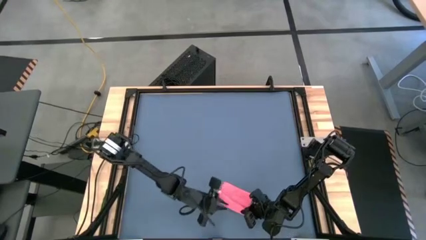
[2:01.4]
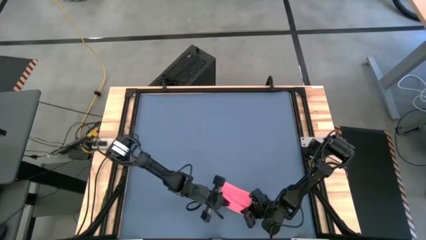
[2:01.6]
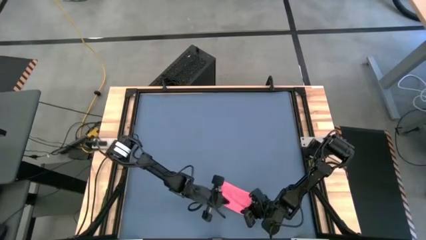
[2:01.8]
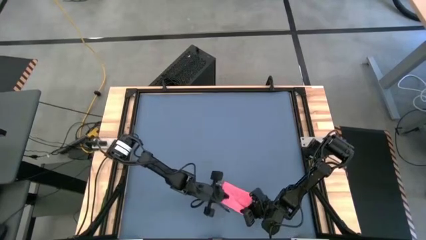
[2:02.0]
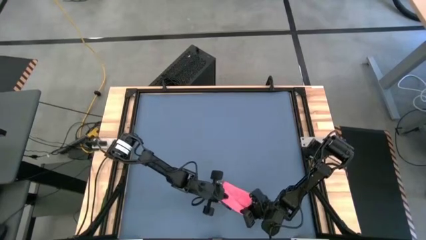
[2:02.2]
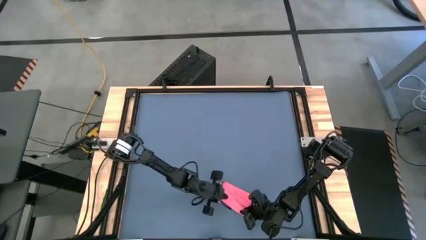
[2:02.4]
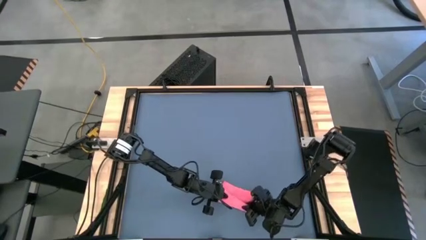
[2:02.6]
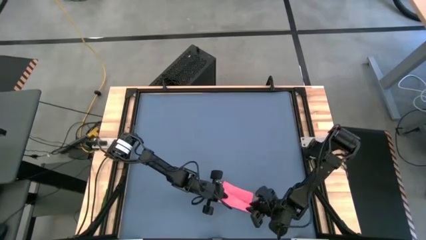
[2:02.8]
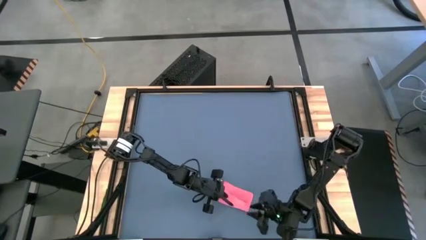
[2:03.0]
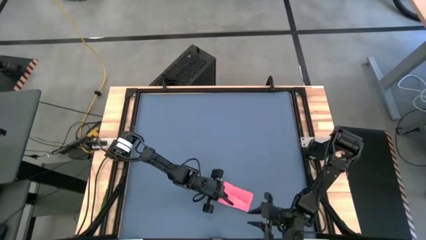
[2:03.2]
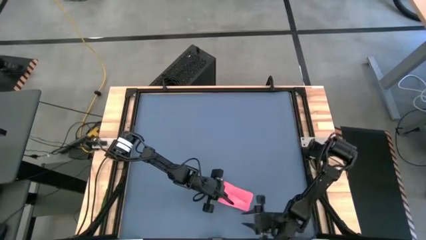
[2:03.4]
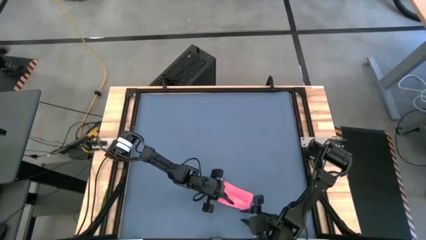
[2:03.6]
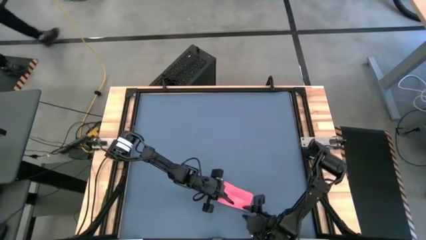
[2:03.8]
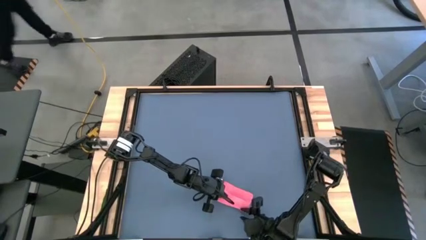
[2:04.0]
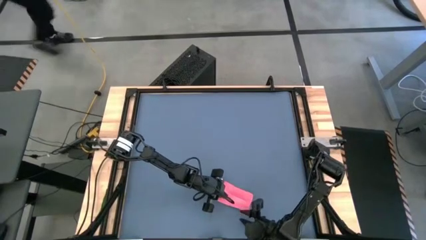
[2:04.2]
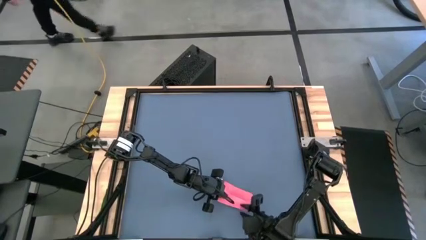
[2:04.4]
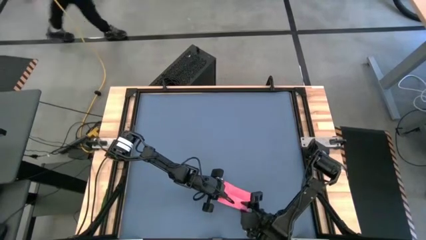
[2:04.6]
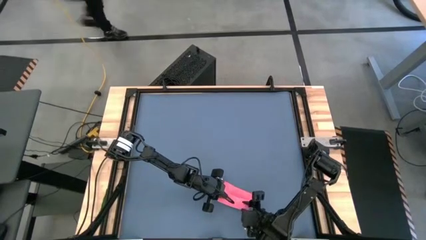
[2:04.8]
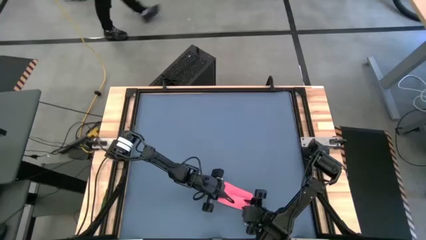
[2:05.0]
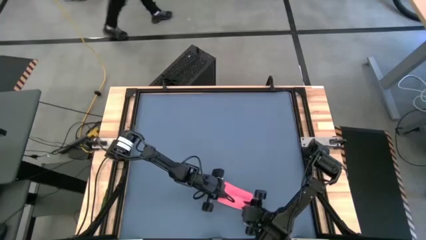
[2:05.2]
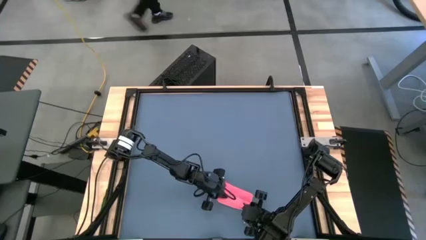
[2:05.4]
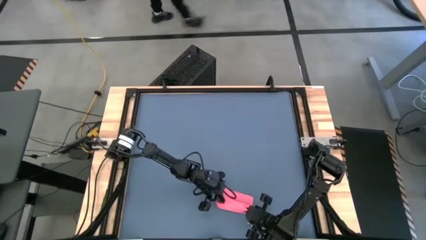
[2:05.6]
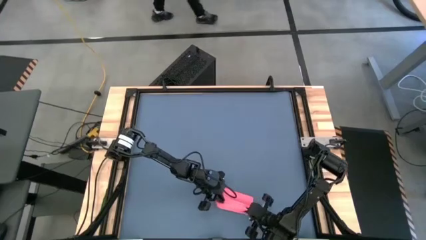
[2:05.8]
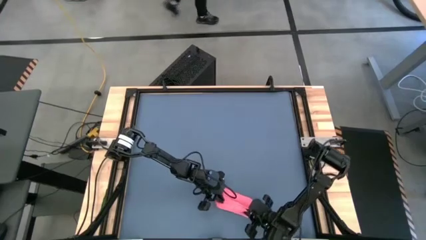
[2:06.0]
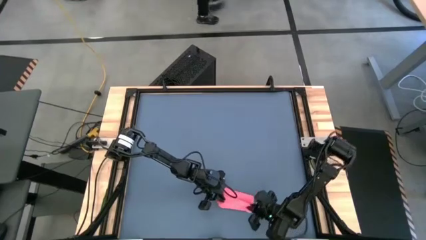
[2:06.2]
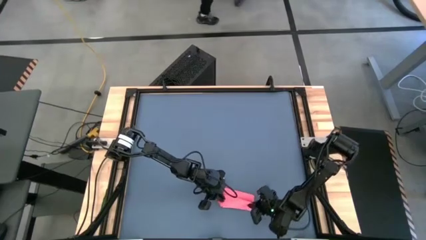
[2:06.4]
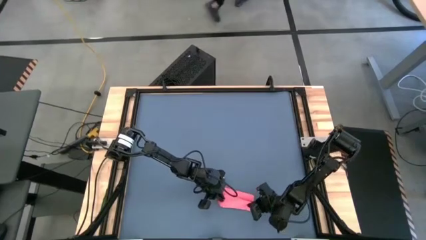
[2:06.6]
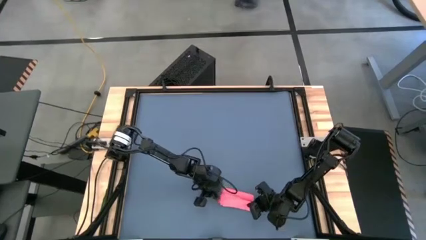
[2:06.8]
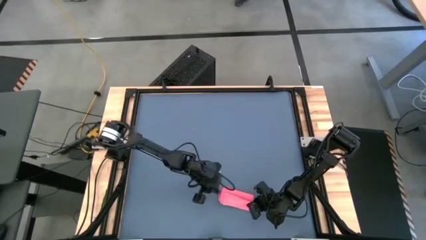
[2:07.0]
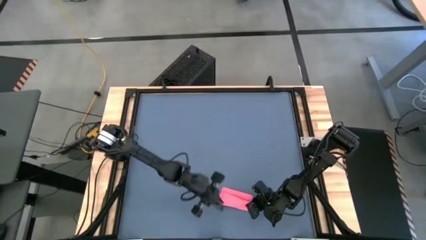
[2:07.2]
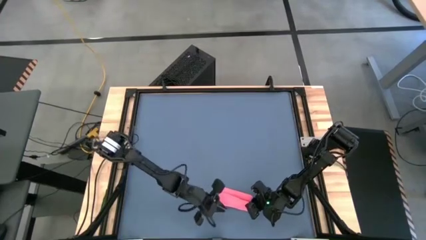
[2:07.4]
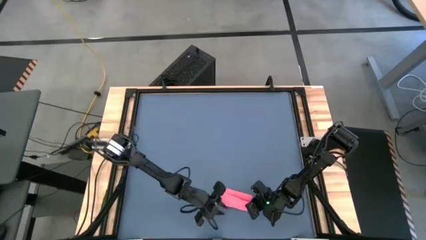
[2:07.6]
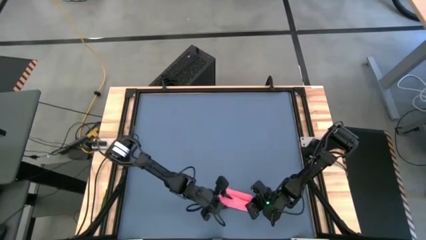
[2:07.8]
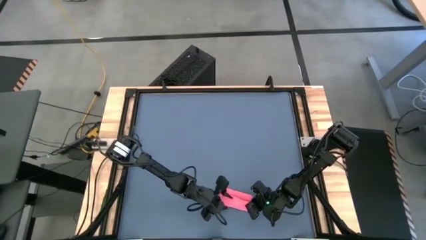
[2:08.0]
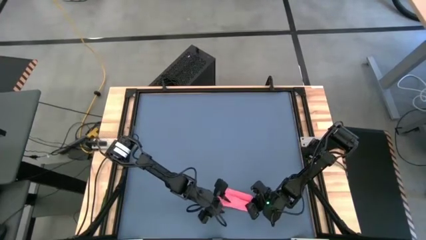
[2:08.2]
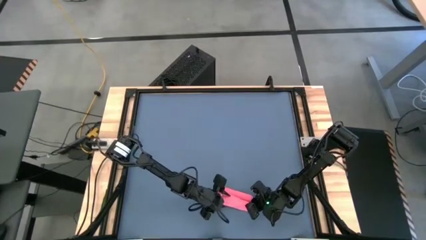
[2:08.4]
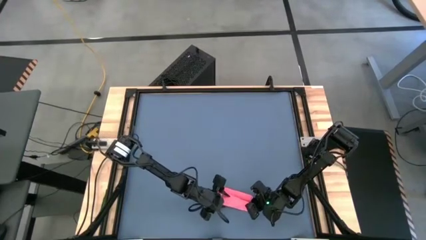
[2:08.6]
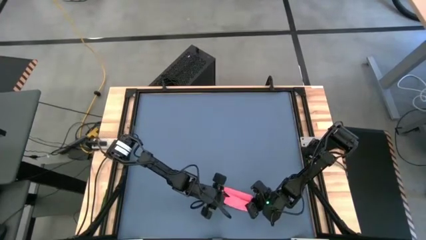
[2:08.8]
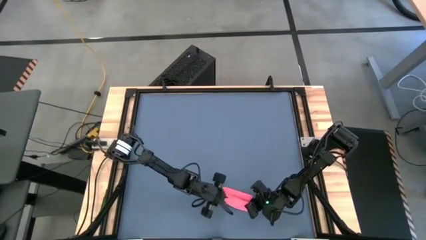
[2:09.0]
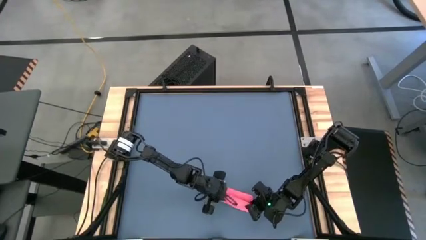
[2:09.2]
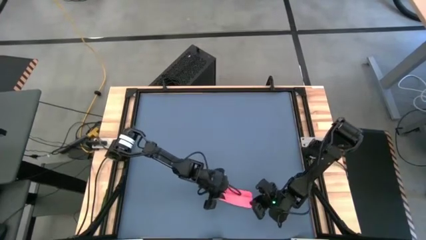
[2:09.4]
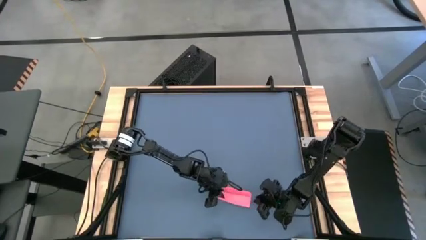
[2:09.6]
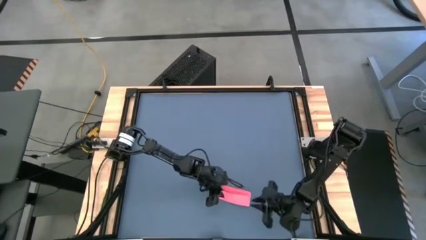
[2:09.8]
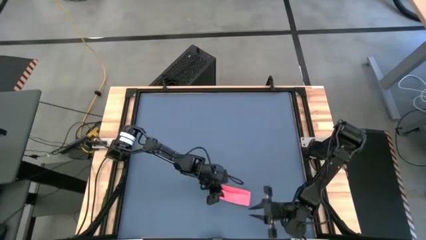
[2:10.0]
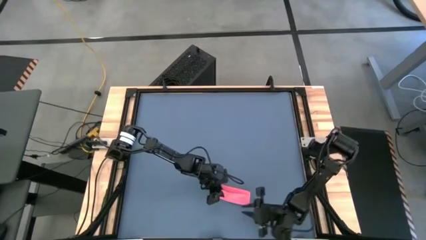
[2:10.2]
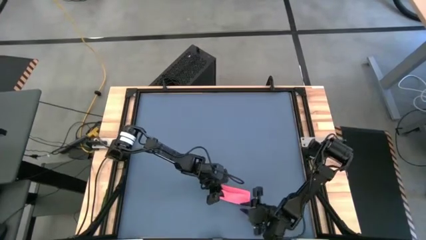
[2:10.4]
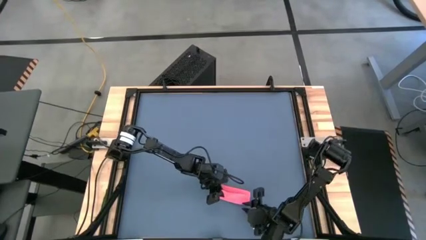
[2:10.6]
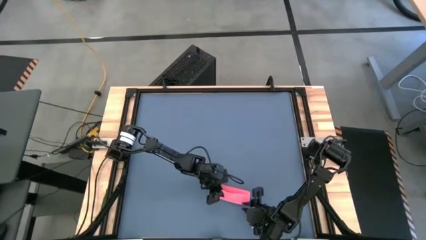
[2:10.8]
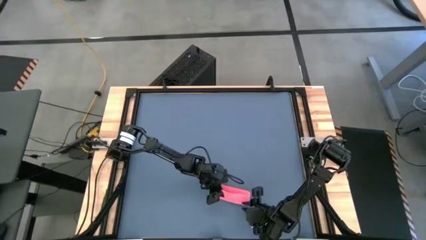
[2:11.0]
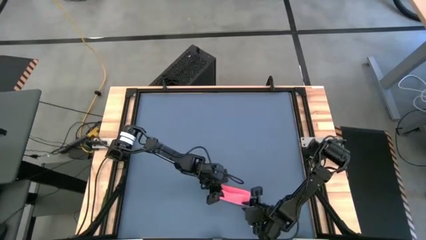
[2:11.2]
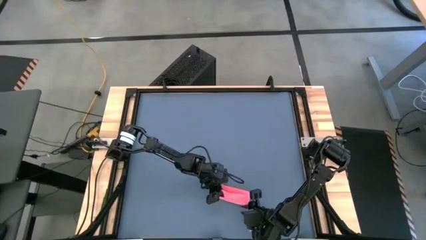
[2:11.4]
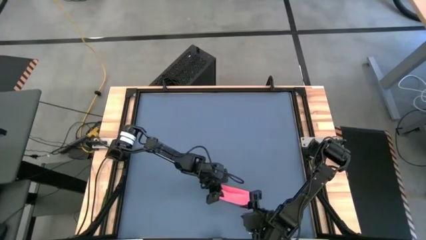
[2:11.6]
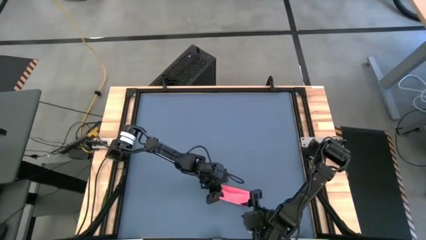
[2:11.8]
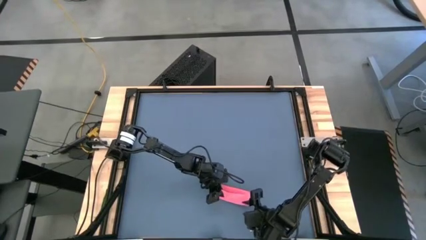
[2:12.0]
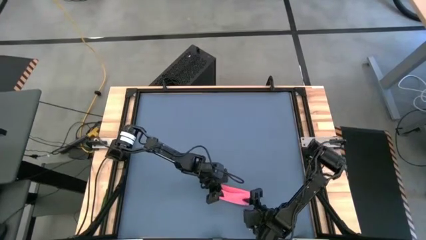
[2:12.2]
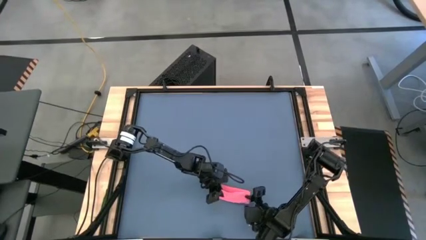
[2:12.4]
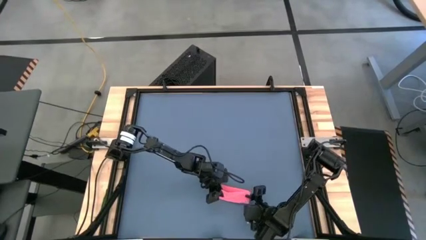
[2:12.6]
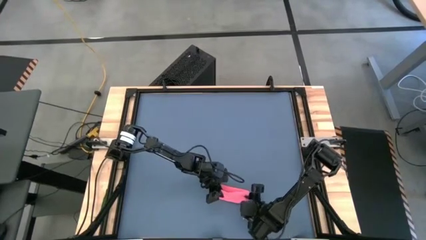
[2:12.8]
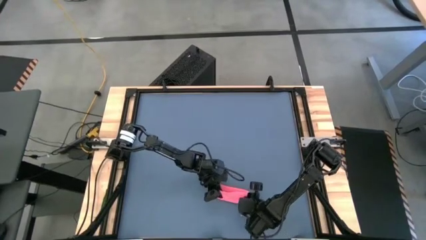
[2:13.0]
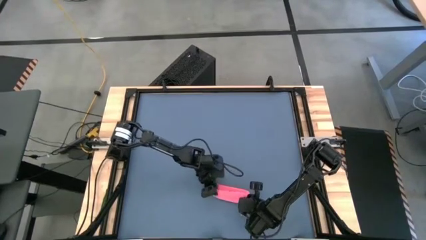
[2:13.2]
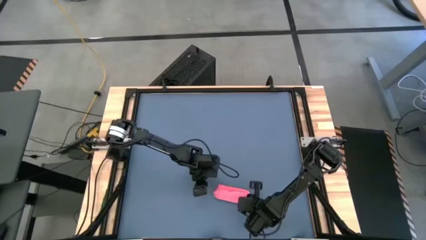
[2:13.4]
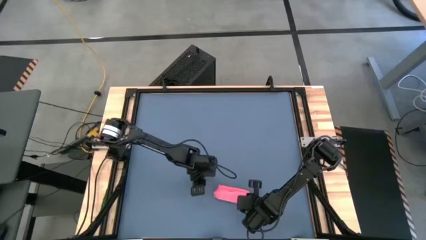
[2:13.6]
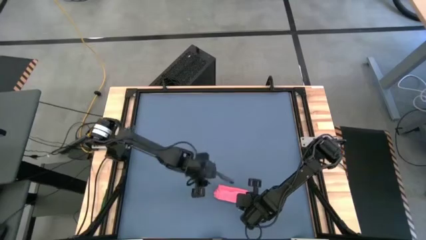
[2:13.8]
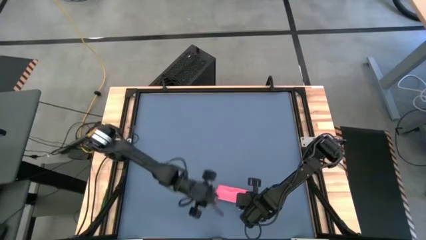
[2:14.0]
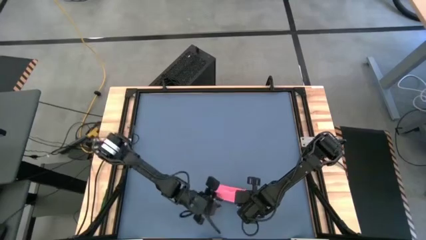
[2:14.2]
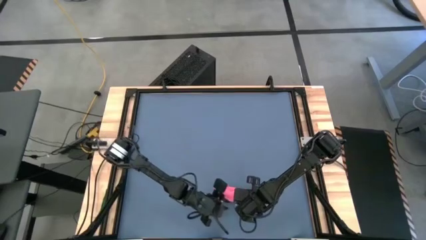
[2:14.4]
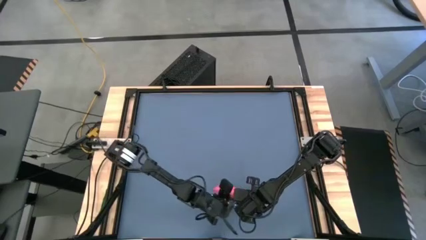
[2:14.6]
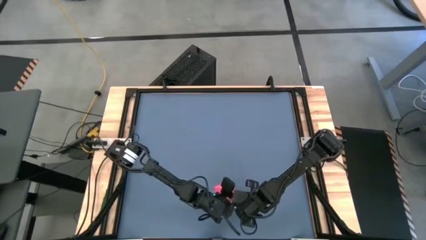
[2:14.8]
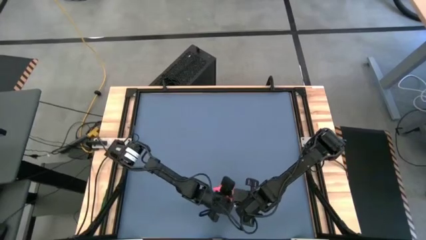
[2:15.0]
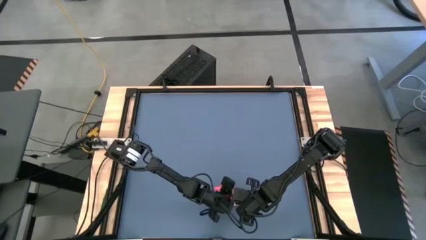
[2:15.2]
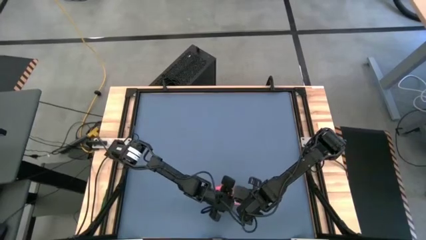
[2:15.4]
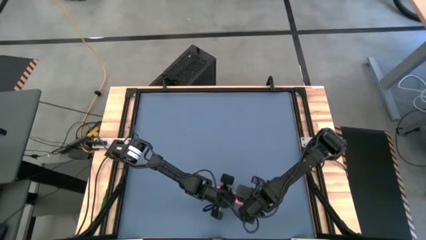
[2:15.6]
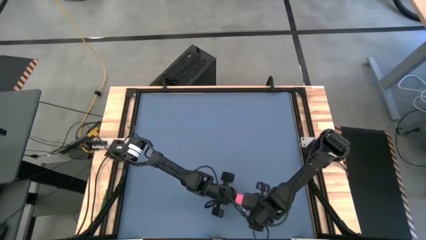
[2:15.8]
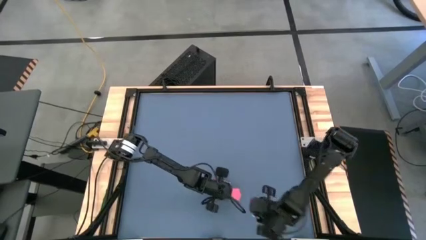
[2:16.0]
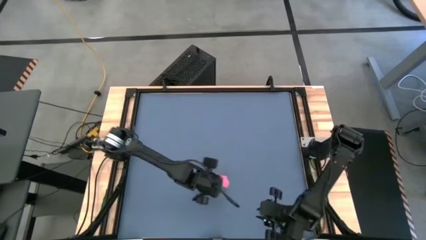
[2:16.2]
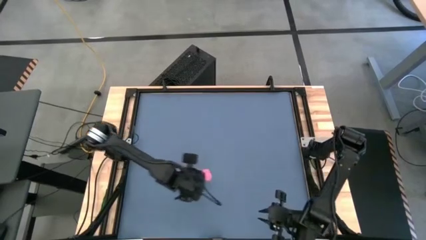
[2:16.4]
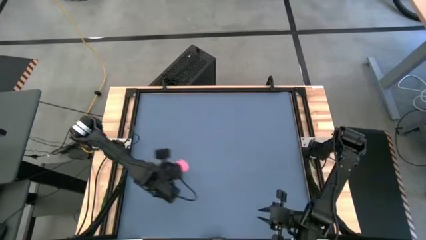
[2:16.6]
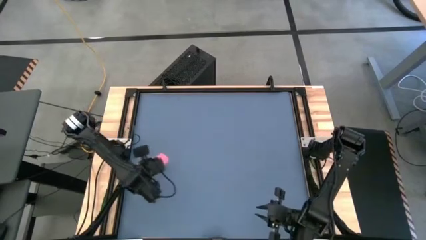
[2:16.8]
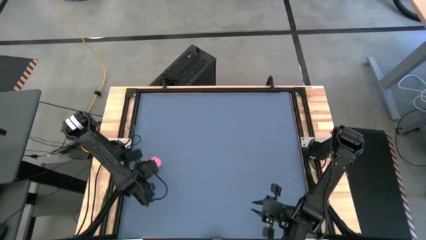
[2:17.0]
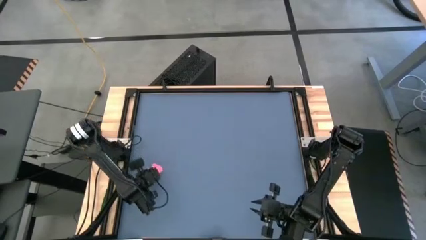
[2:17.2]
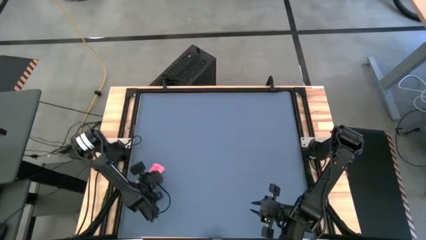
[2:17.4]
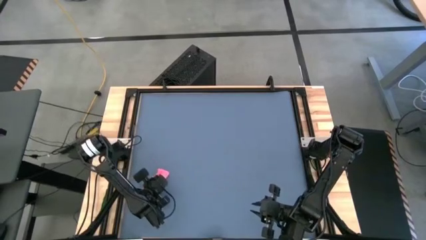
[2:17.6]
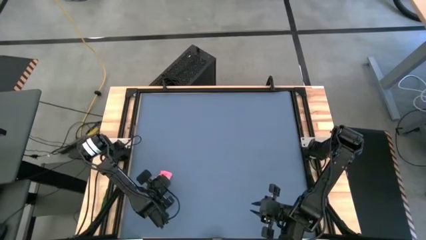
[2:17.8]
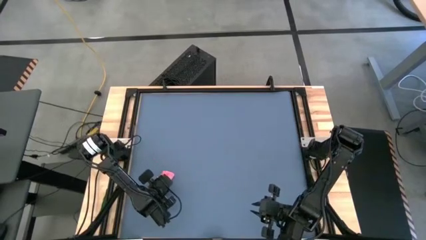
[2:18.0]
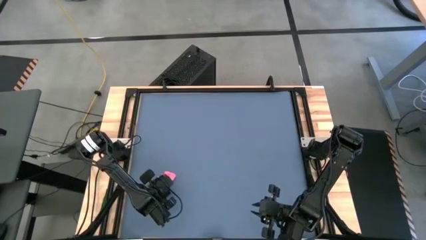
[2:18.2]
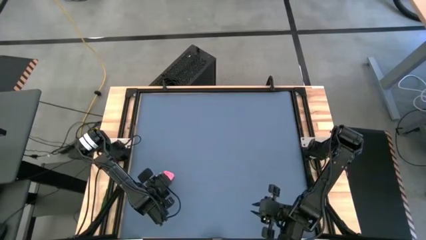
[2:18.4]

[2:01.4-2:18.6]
Task: Roll towel
Roll the microfiber towel
